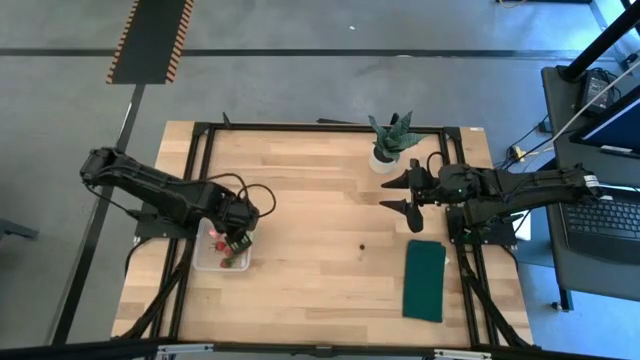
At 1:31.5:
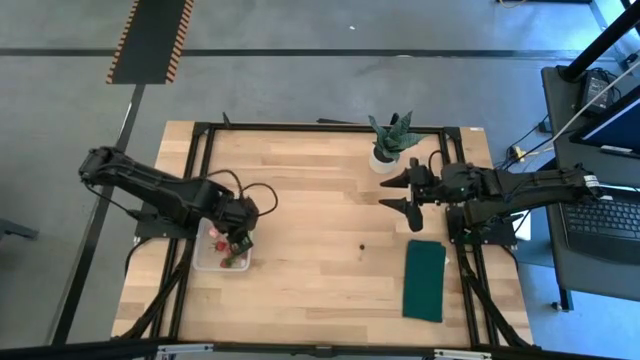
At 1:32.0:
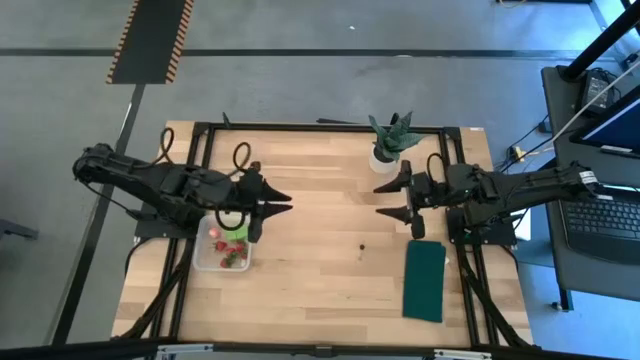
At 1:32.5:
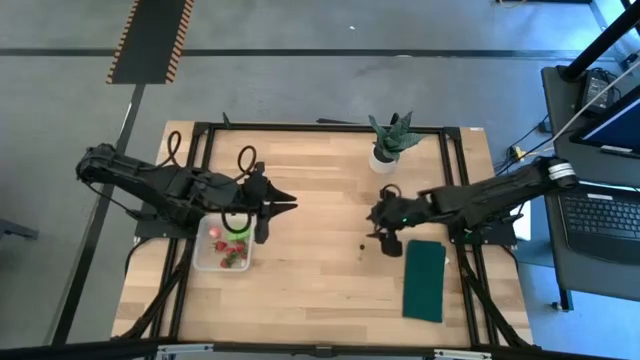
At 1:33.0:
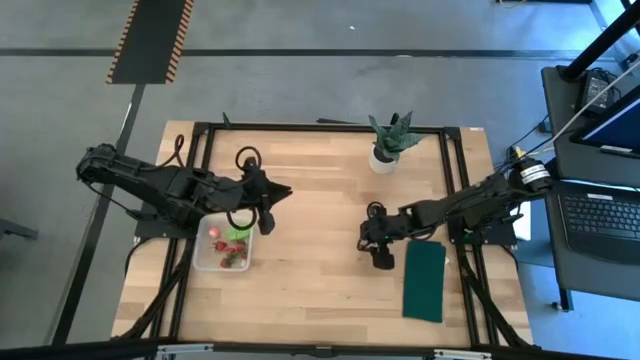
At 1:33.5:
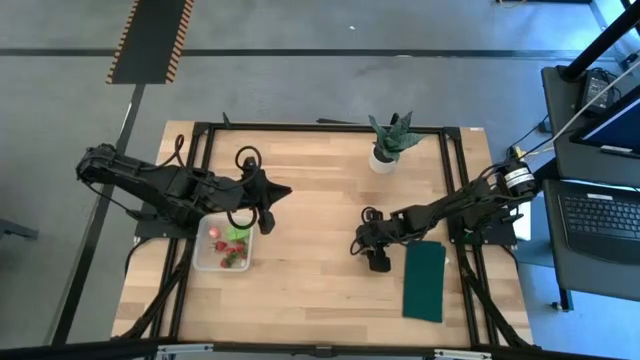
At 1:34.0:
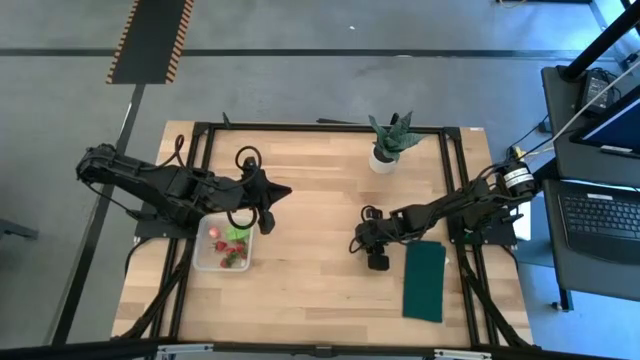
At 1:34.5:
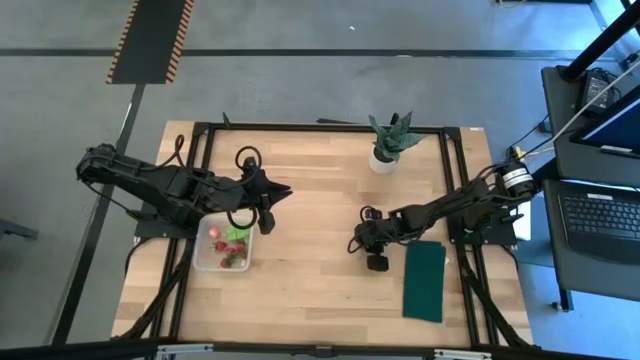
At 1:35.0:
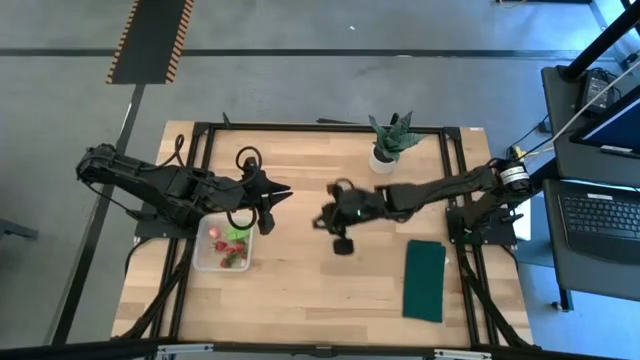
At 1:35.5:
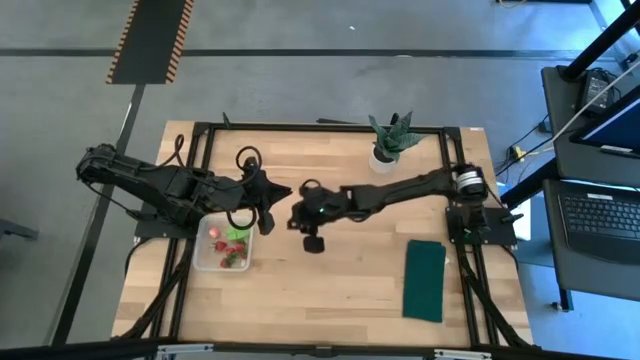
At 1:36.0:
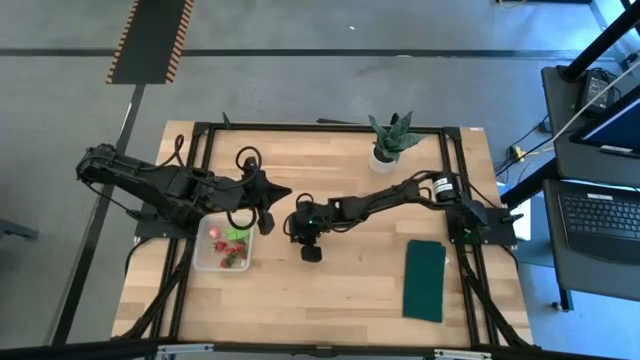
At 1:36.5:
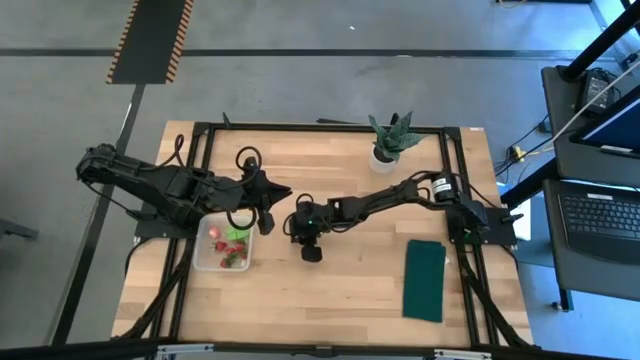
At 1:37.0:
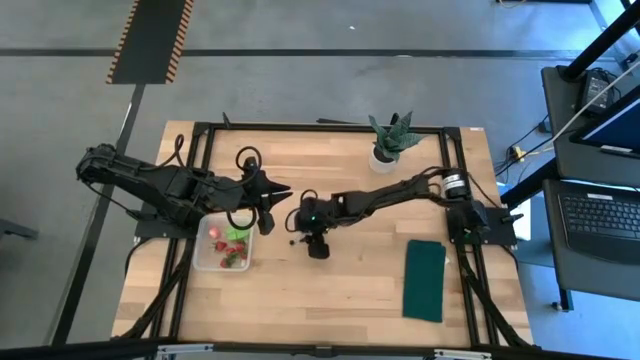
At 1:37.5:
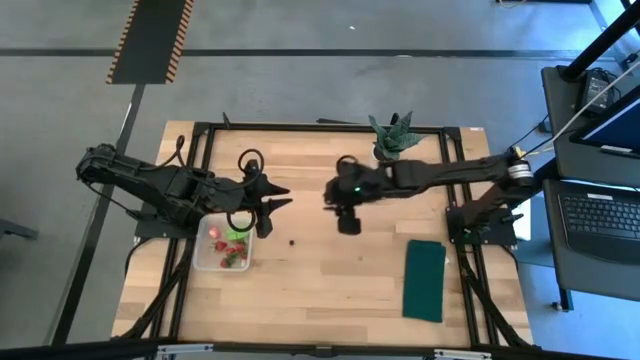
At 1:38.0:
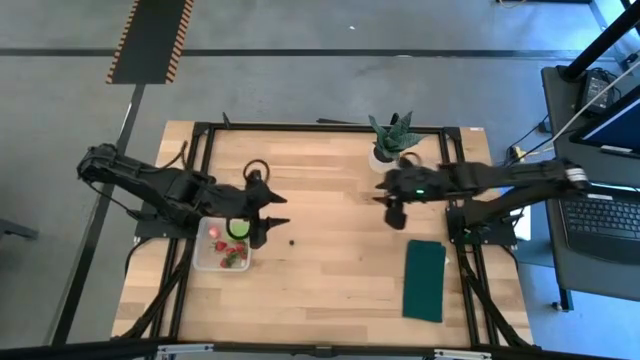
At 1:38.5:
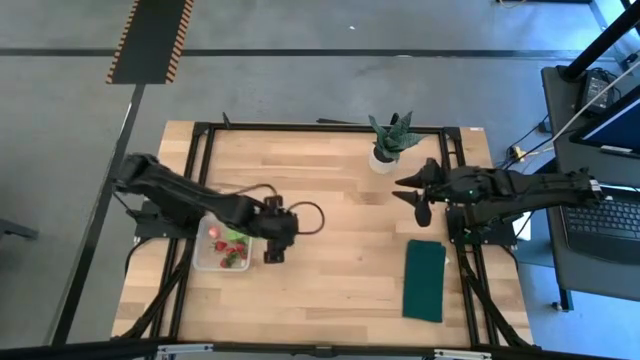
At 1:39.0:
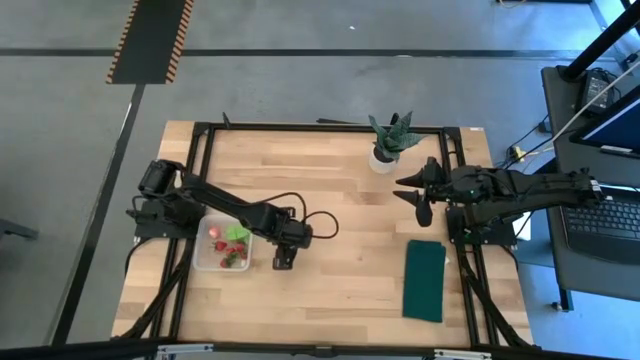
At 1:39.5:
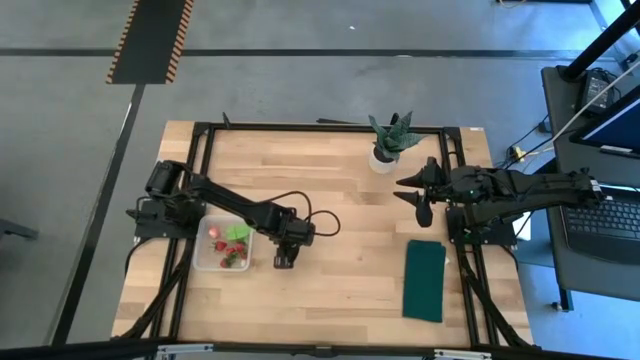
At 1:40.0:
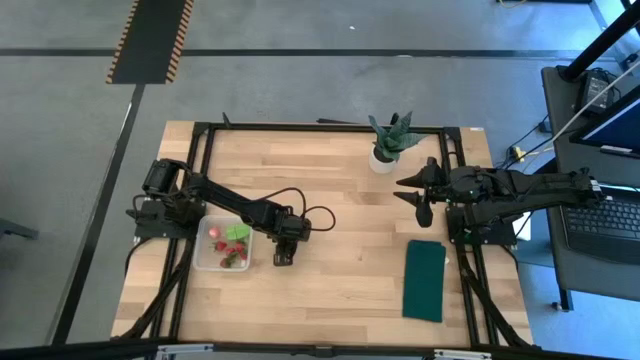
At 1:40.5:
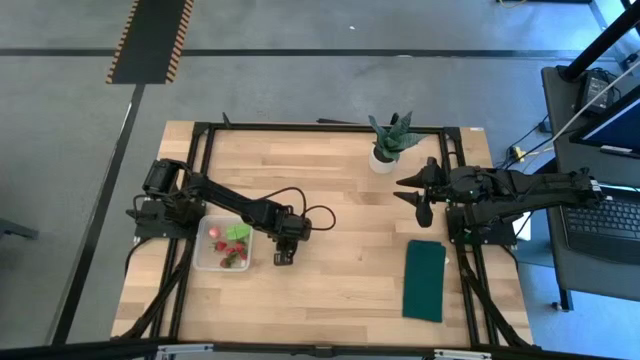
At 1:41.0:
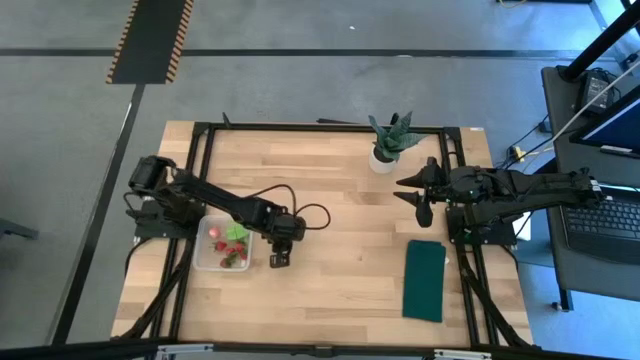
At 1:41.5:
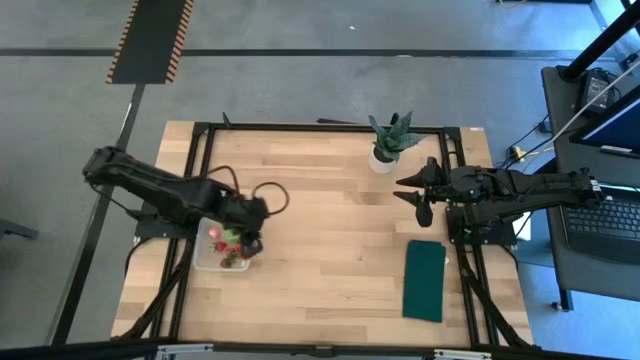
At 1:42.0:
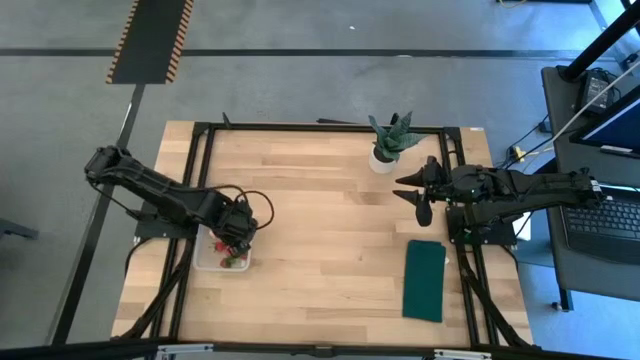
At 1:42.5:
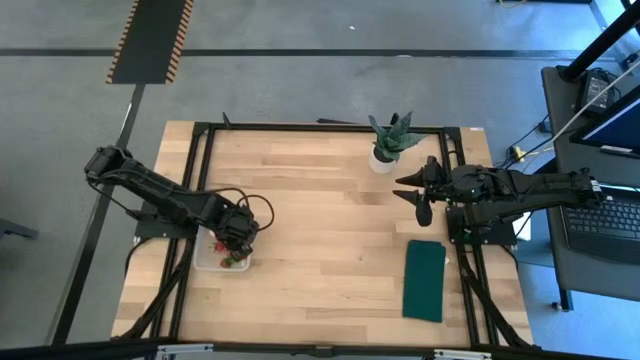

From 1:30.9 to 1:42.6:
Task: Pick and placing Produce into tupperware
Put the black cherry into the transparent bin

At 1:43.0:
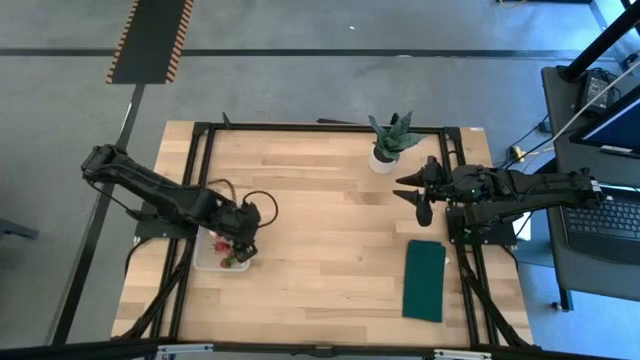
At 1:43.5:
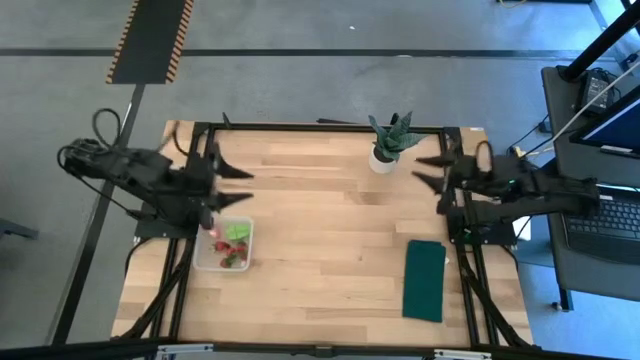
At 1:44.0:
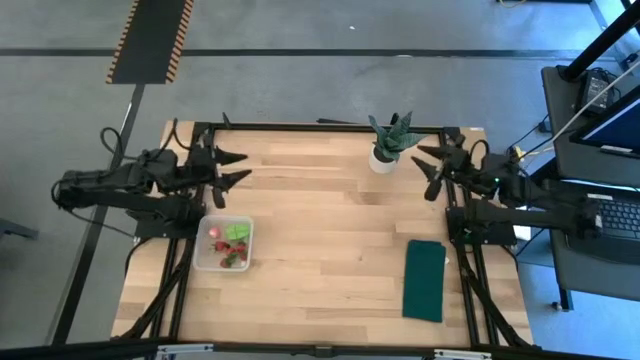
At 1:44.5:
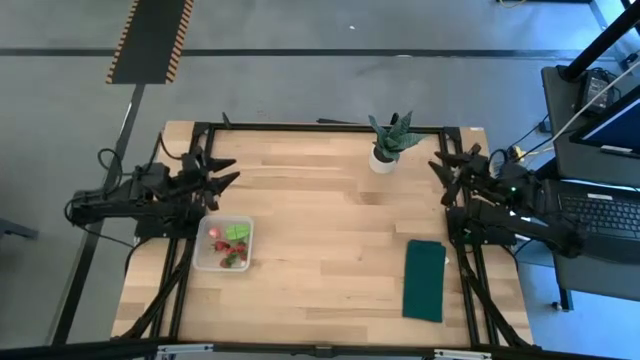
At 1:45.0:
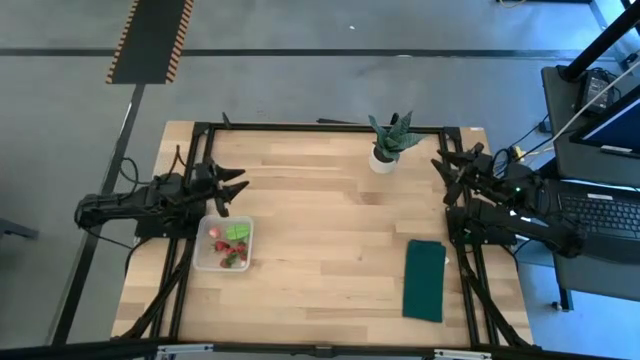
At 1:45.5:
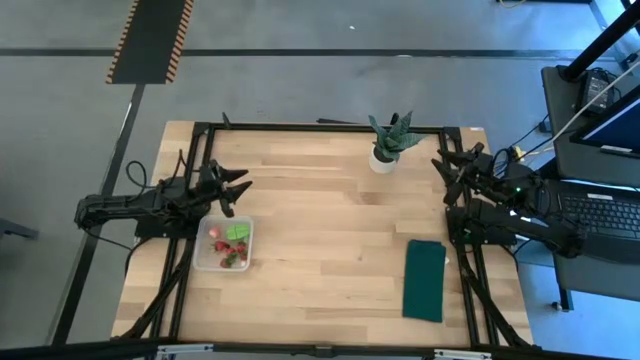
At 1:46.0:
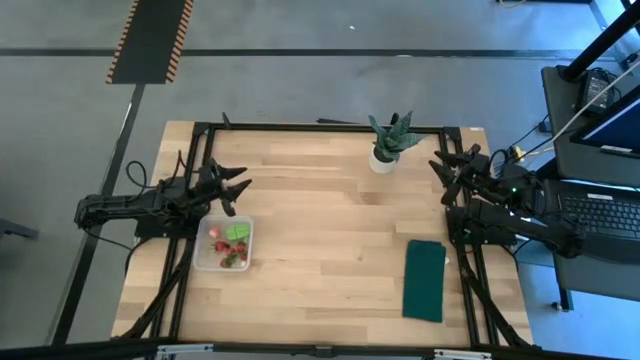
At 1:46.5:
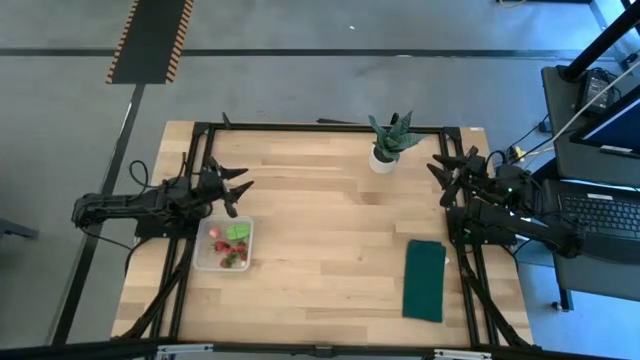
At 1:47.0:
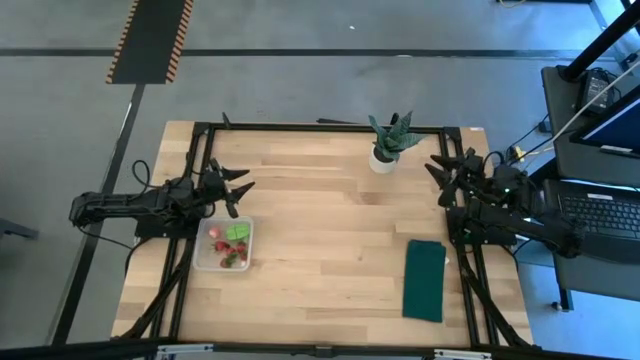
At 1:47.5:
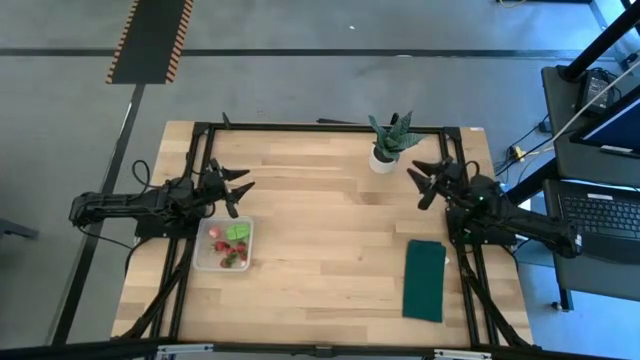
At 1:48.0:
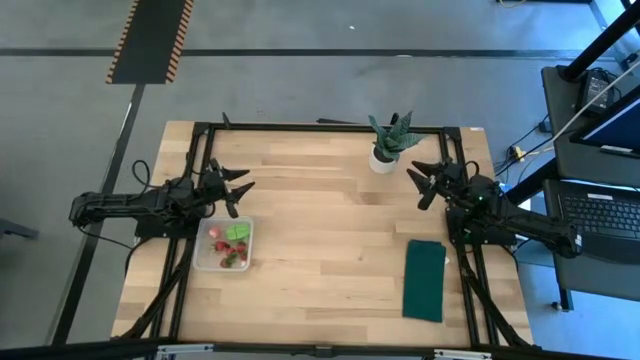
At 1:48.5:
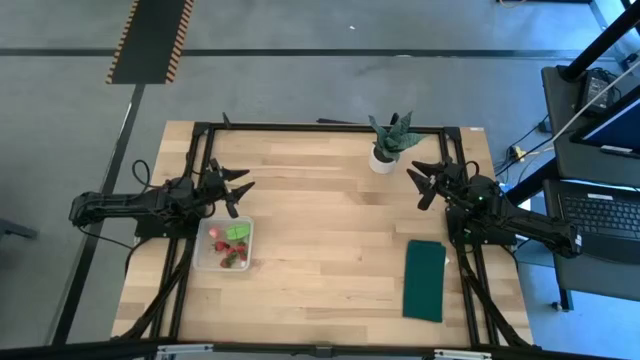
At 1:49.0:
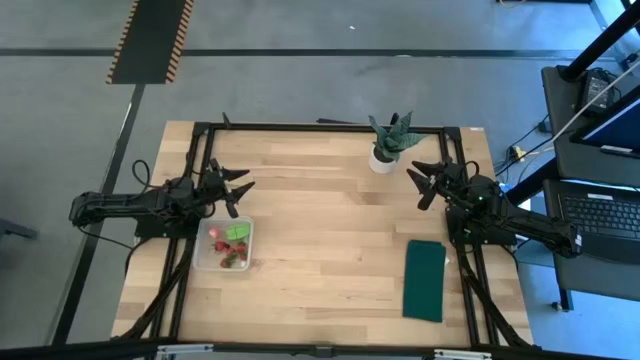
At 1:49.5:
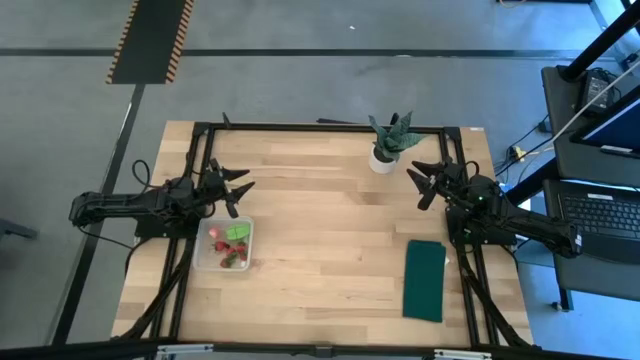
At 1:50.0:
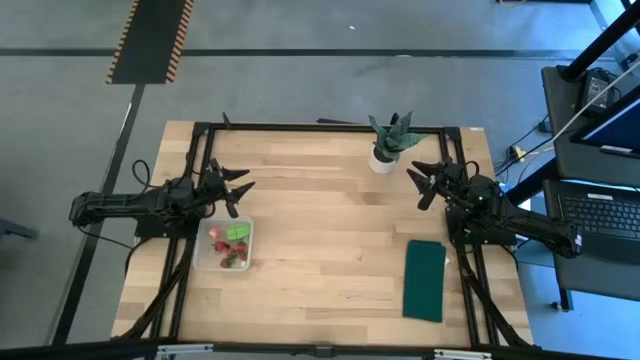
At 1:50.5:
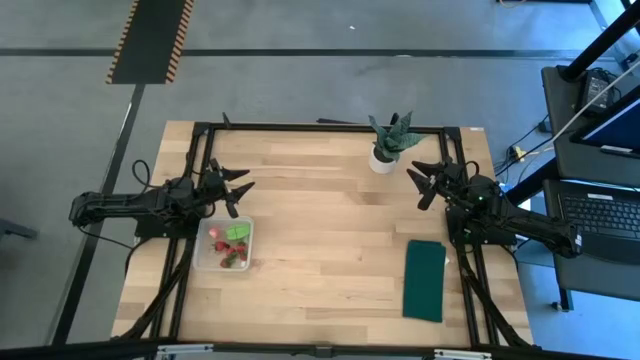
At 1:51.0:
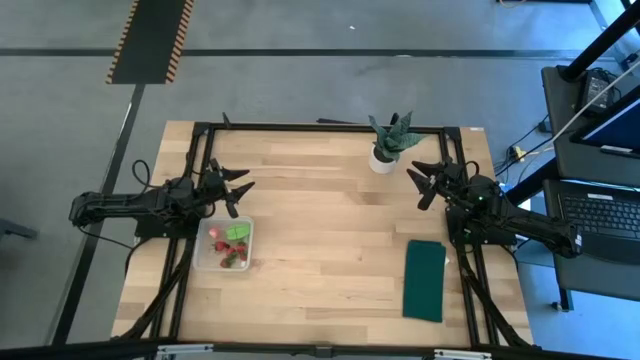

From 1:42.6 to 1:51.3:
Return To Home Position
